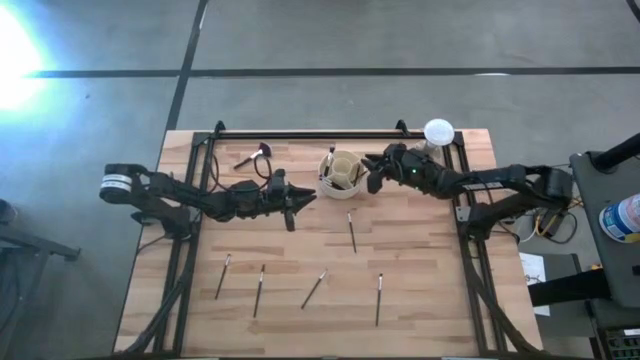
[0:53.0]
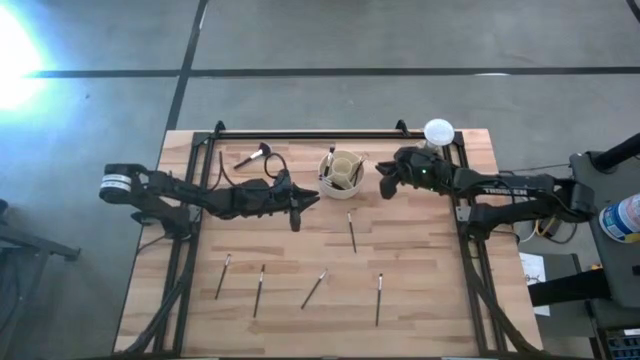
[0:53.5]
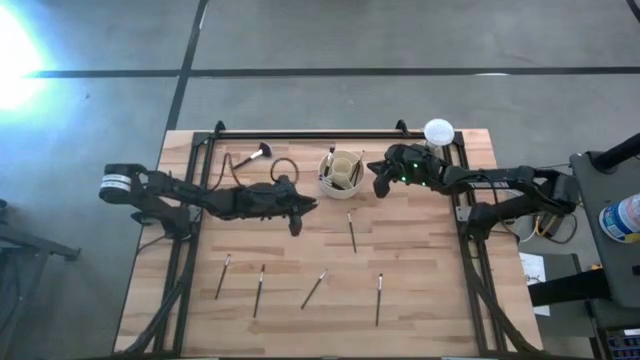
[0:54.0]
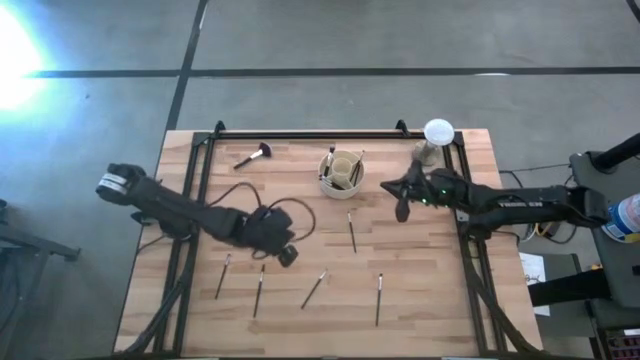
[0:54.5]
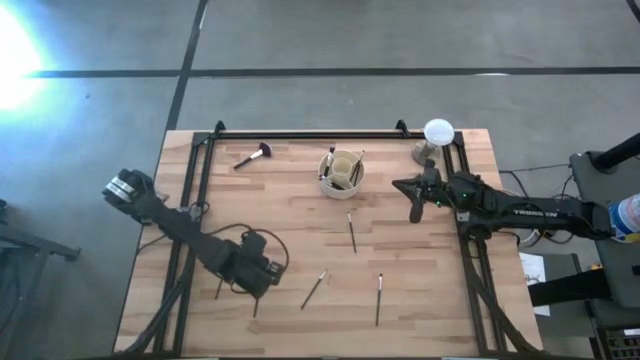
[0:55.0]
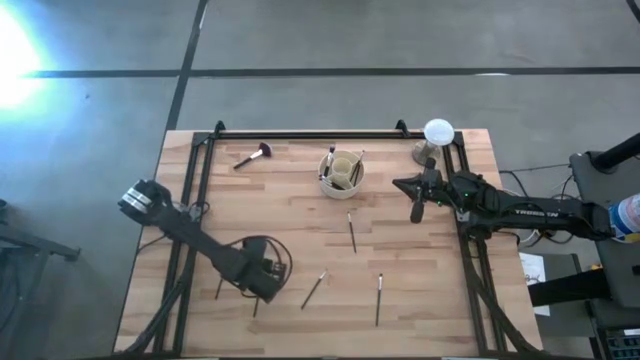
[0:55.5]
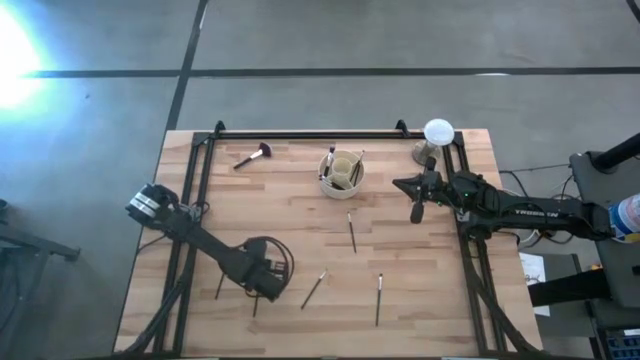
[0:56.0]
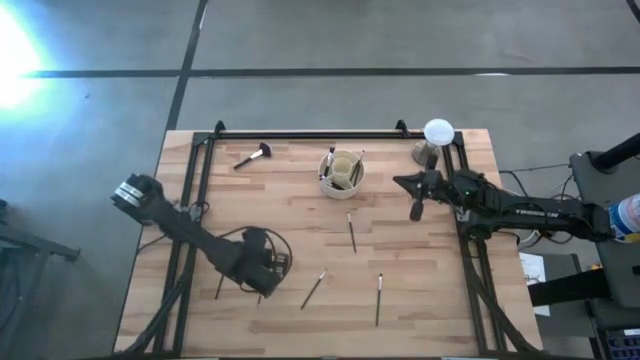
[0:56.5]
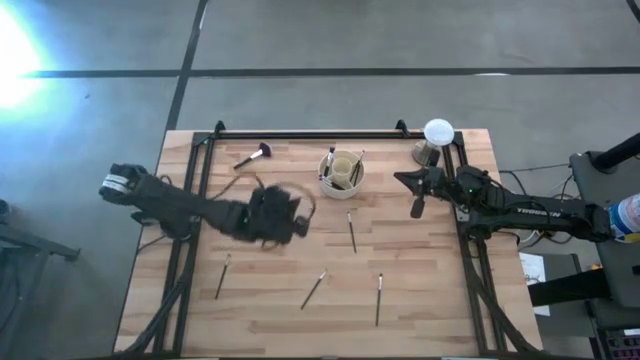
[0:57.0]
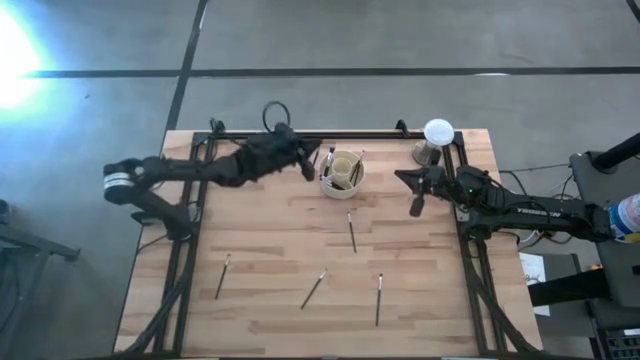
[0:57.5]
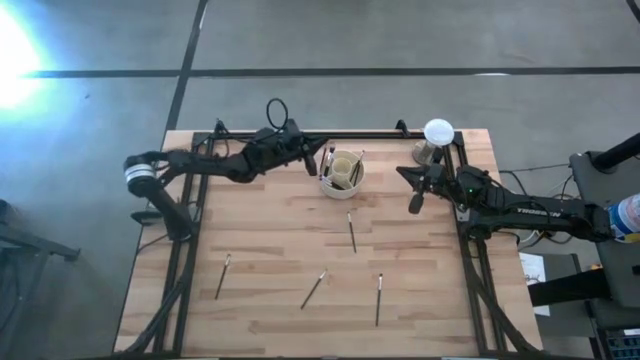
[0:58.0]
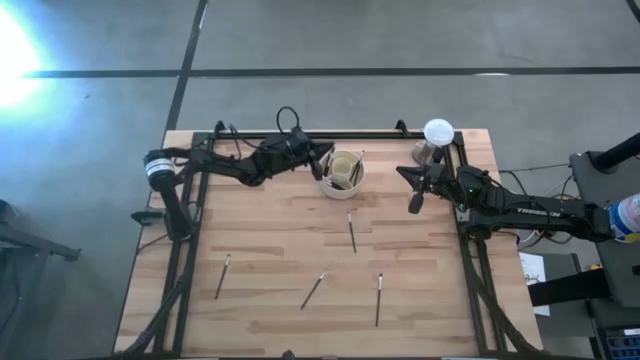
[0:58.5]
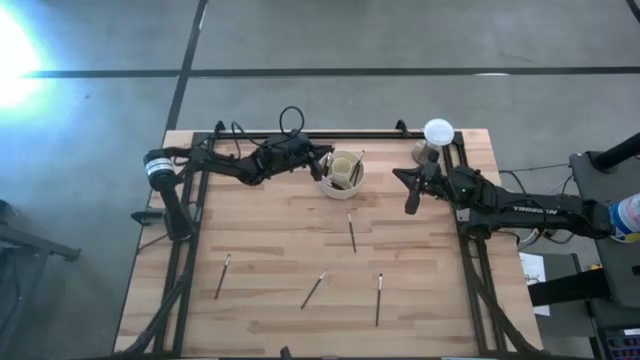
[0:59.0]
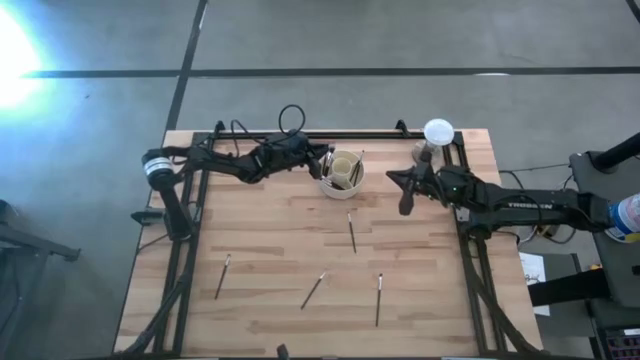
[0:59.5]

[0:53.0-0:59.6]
Task: Put items in baskets/containers
Put the black silver brow brush into the pen organizer

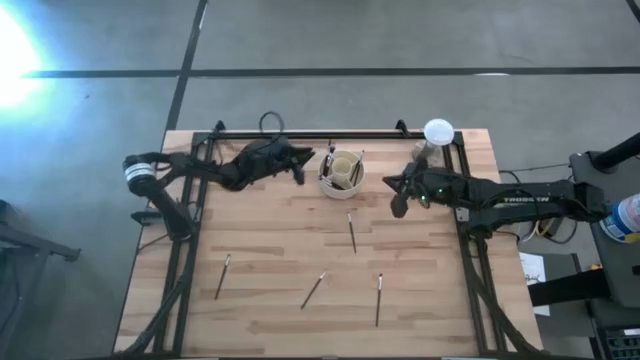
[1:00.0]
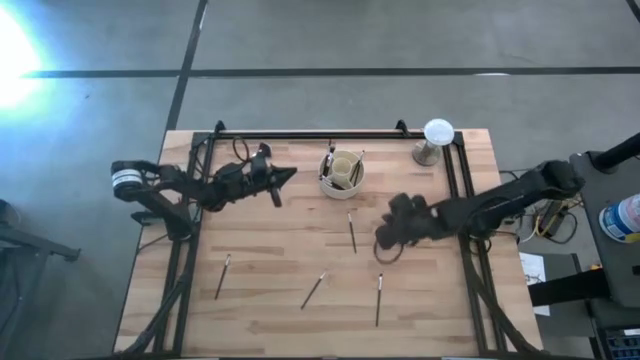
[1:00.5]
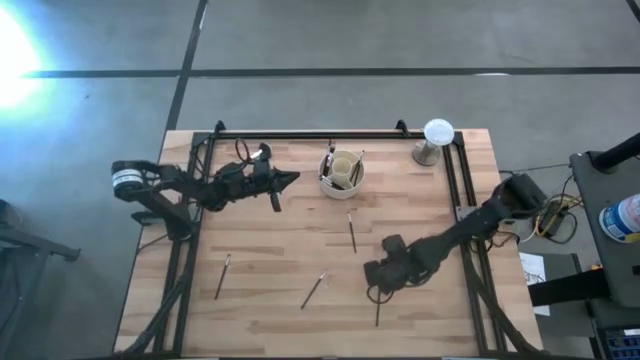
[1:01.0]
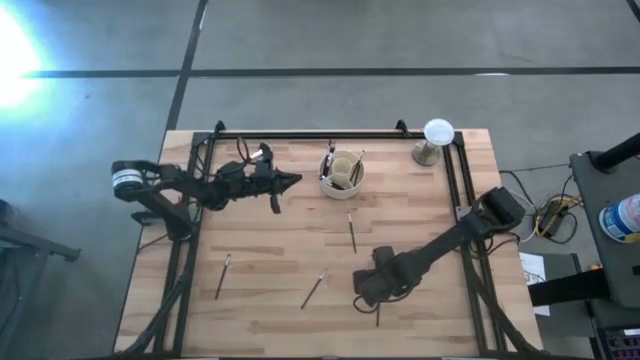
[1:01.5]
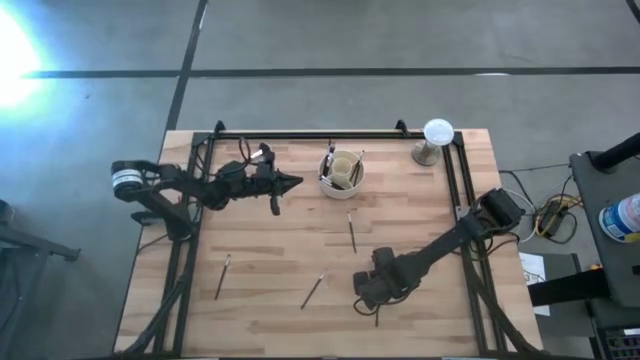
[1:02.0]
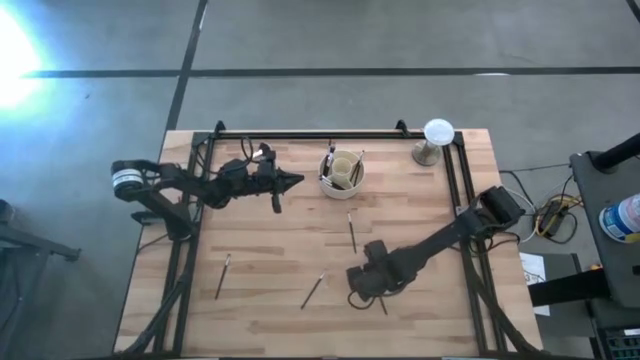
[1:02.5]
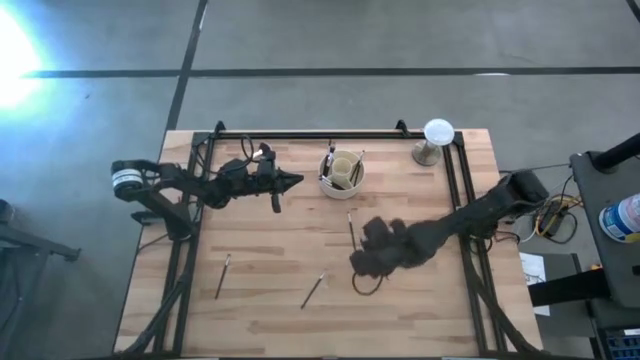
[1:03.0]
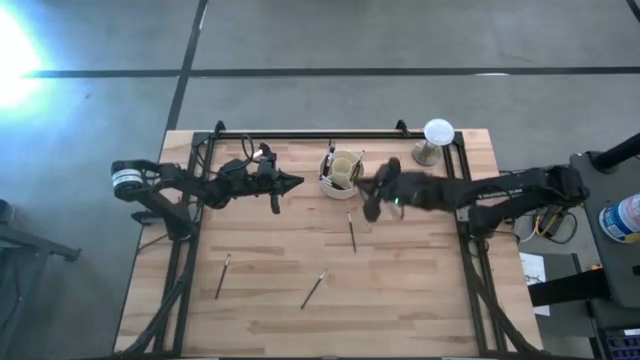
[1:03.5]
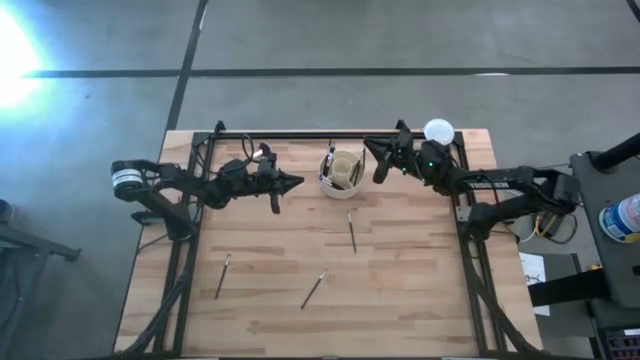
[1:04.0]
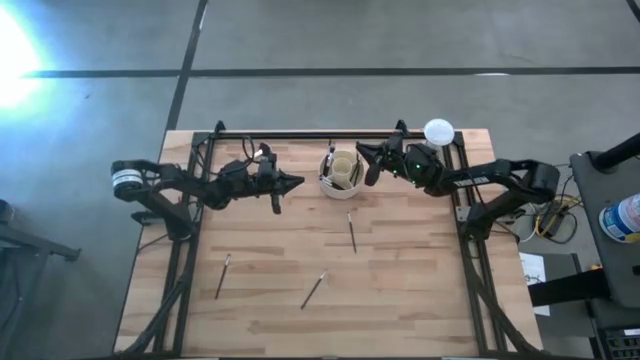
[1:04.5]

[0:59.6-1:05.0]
Put the black silver foundation brush into the pen organizer

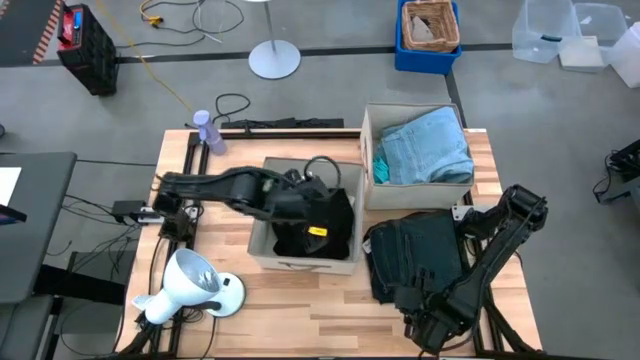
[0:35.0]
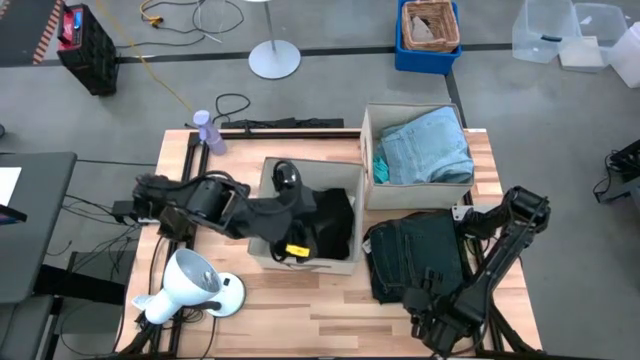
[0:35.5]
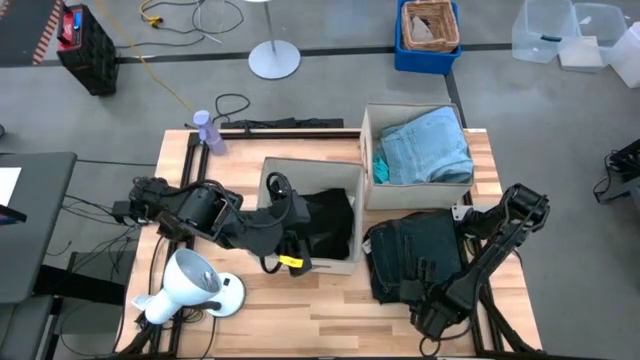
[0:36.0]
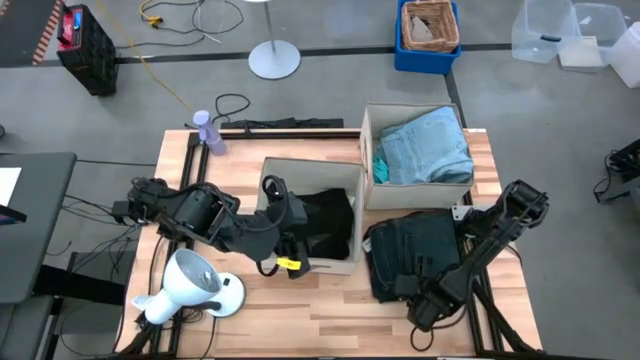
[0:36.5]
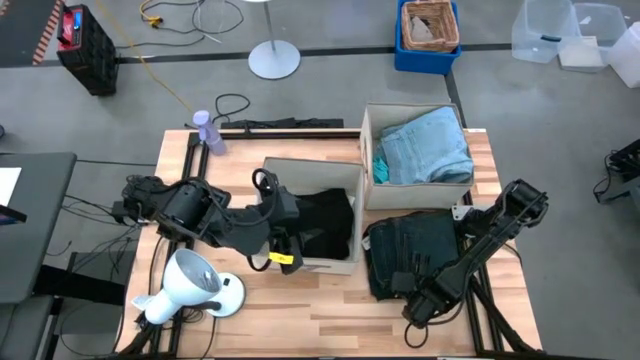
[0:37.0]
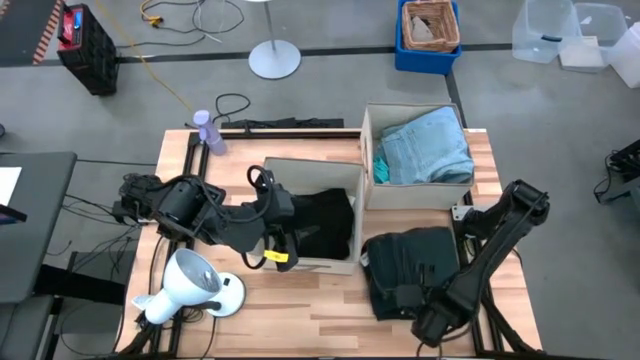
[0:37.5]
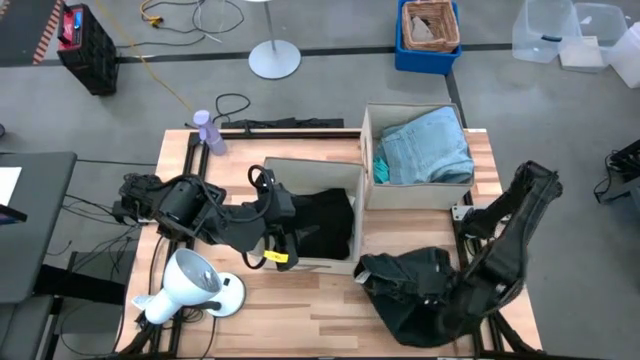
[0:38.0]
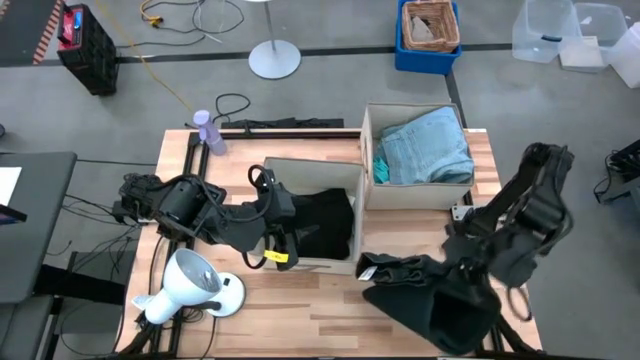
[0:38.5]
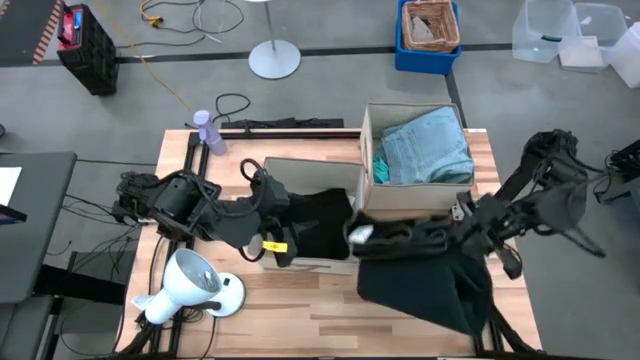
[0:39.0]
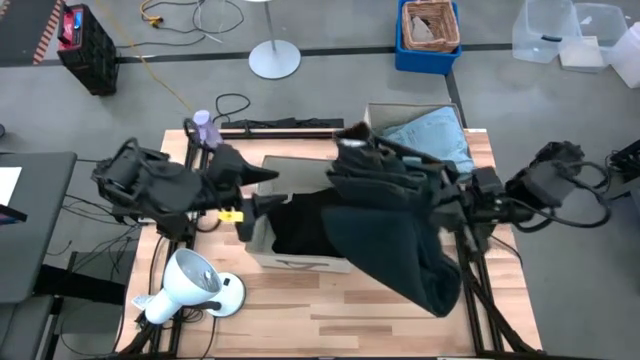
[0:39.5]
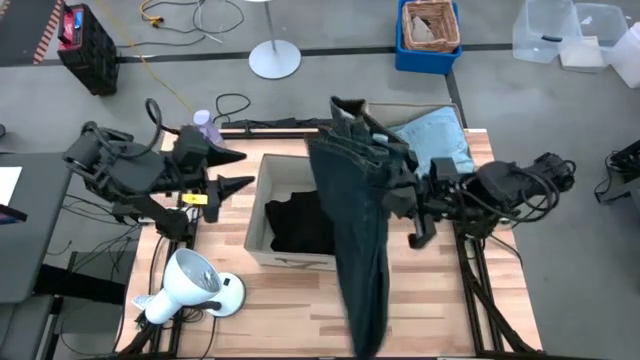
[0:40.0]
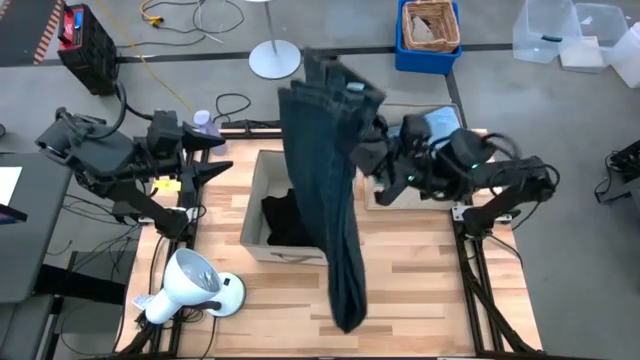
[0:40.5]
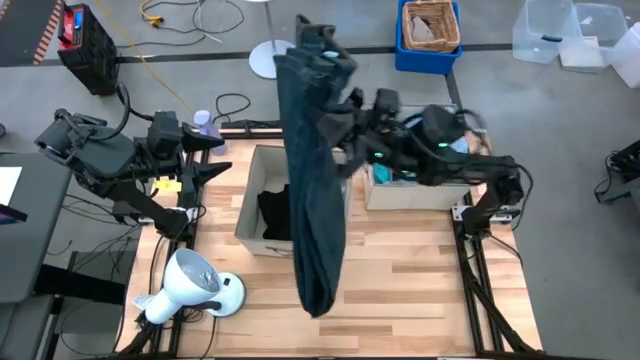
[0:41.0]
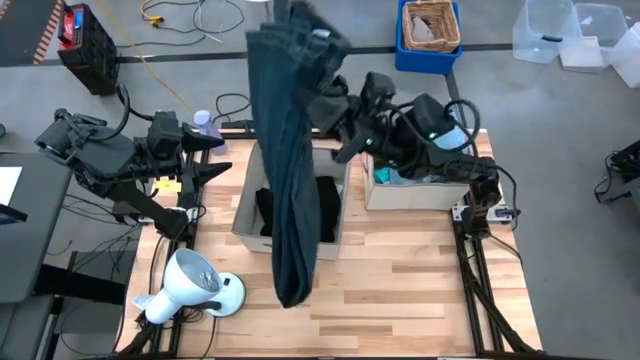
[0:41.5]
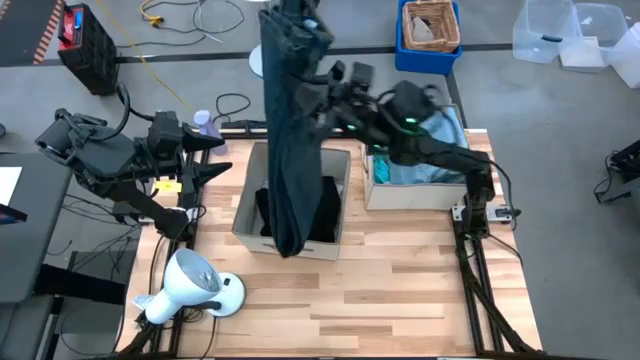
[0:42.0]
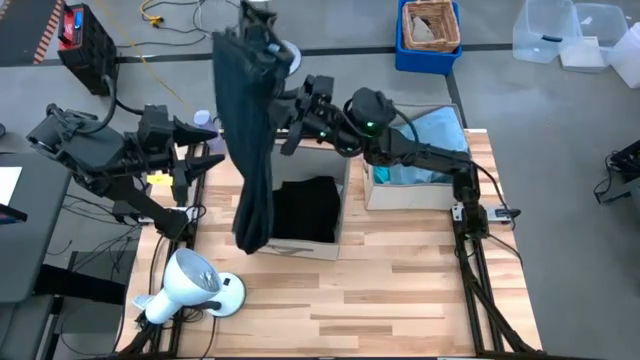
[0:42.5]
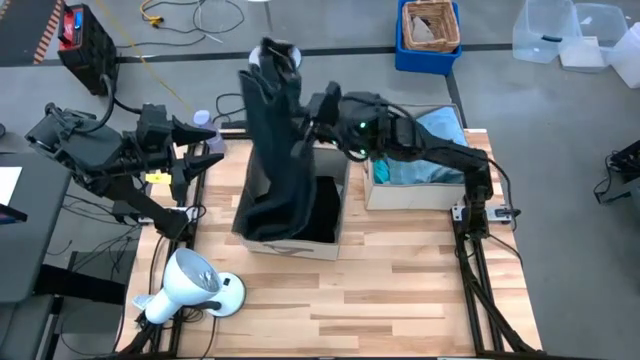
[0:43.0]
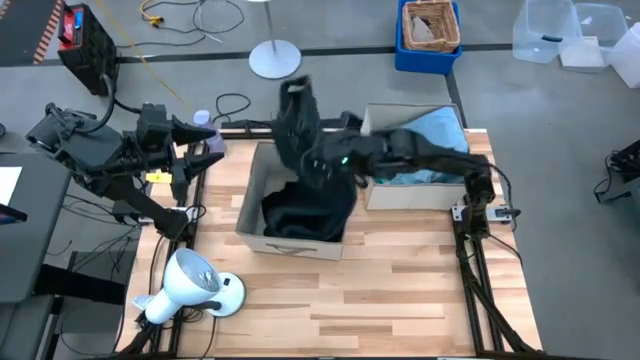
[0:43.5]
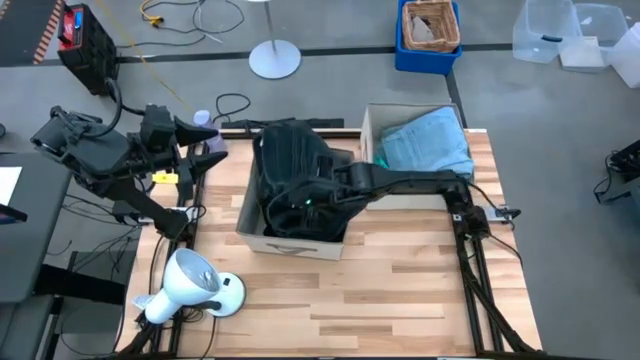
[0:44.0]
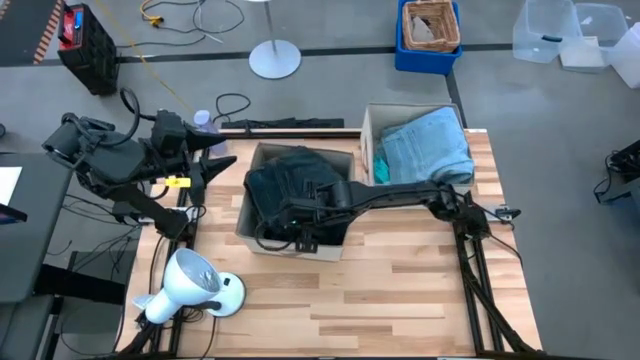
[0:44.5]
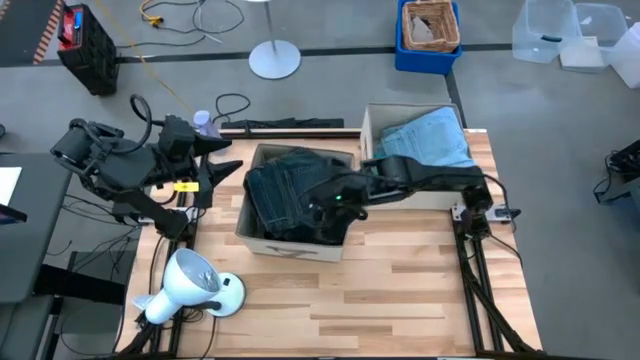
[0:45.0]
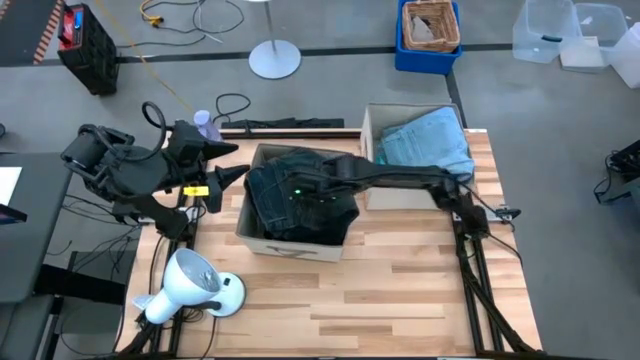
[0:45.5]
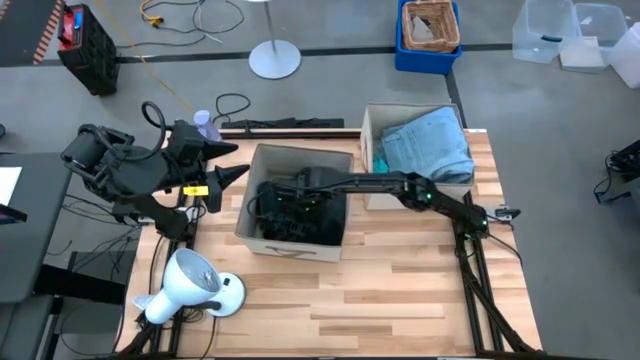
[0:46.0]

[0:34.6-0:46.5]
Task: Sort clothes
Put the dark blue jeans in the left brown bin
